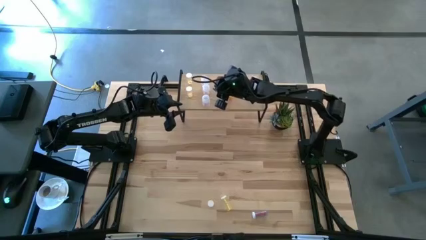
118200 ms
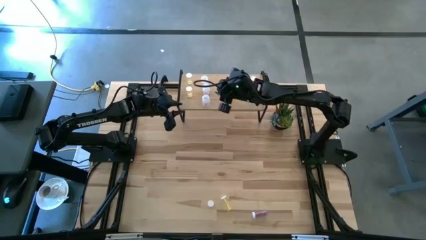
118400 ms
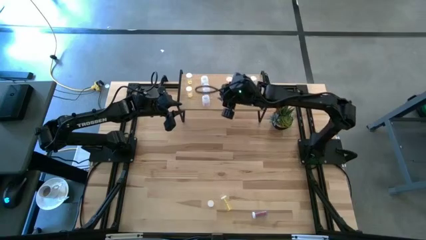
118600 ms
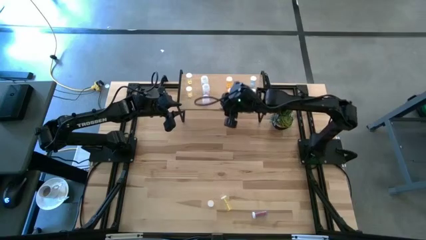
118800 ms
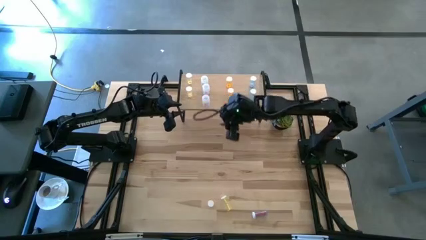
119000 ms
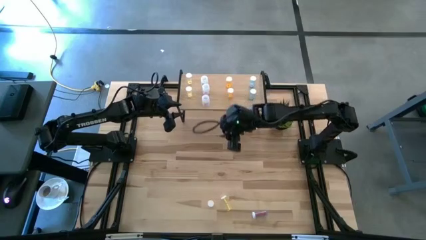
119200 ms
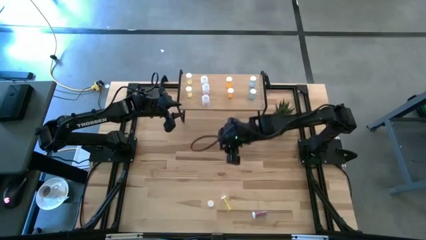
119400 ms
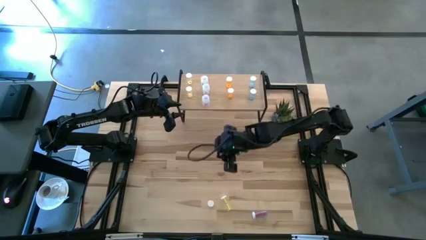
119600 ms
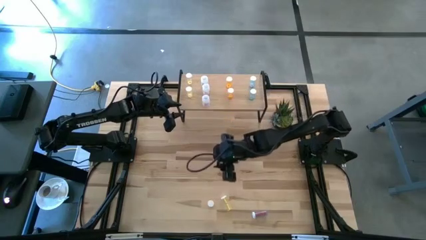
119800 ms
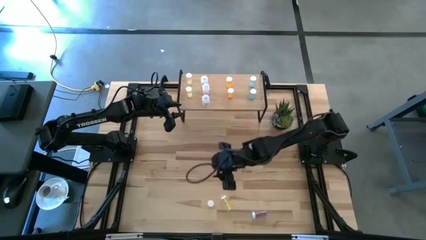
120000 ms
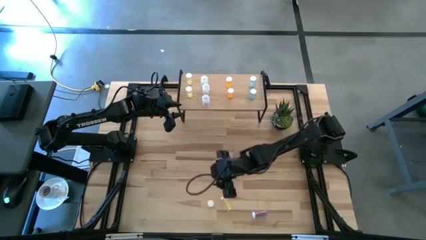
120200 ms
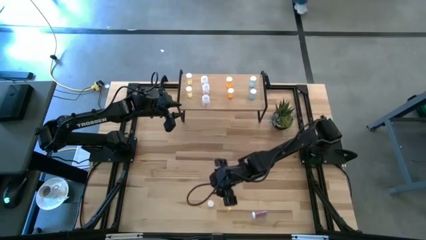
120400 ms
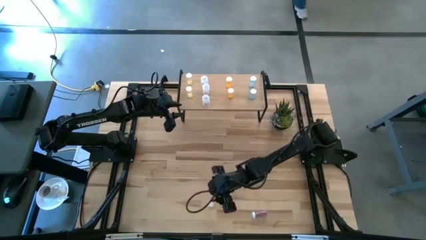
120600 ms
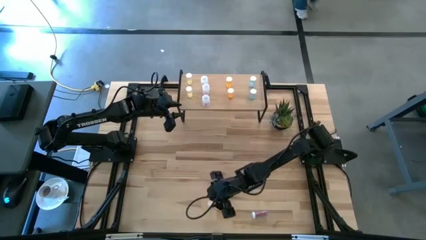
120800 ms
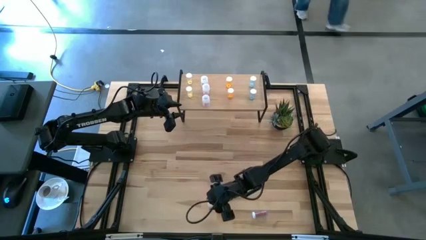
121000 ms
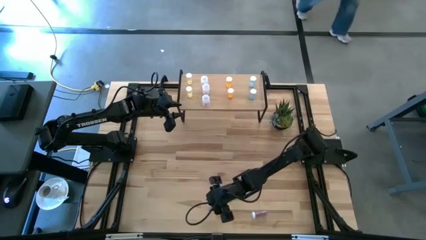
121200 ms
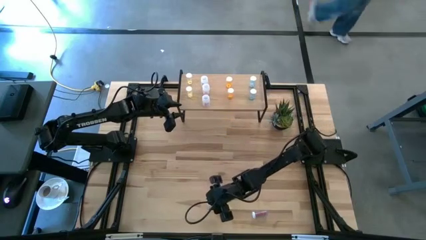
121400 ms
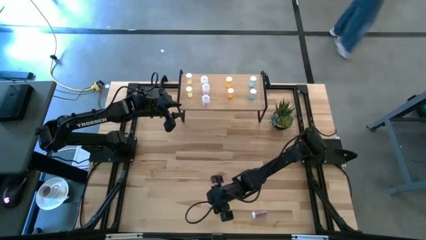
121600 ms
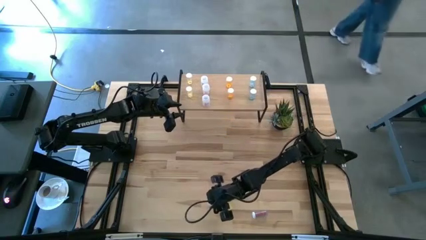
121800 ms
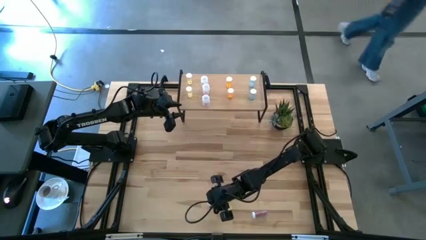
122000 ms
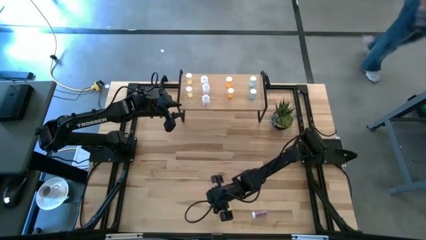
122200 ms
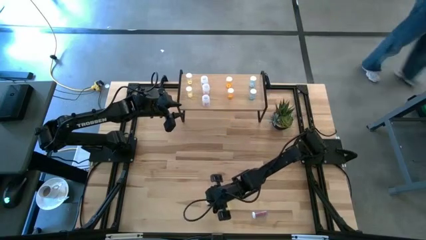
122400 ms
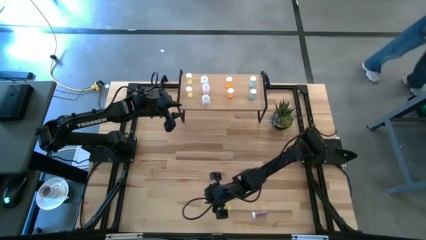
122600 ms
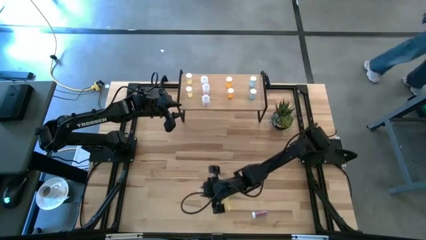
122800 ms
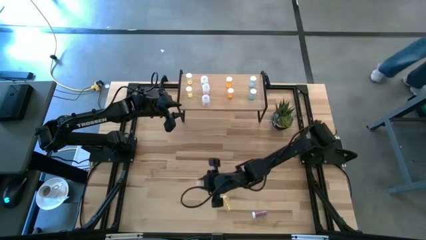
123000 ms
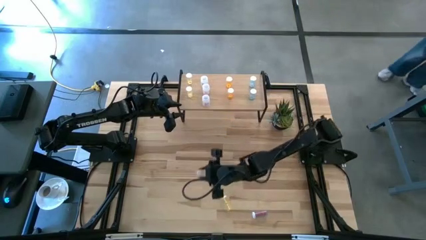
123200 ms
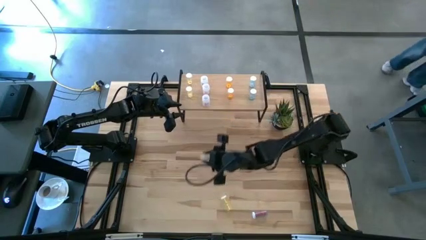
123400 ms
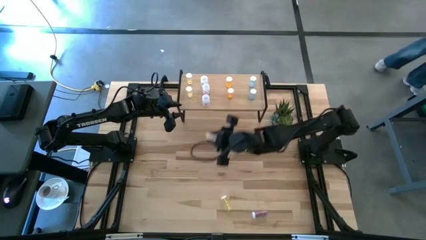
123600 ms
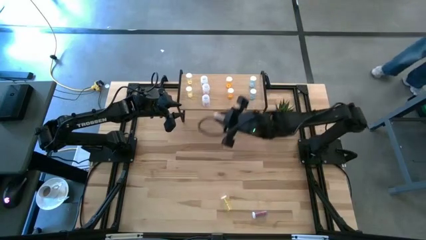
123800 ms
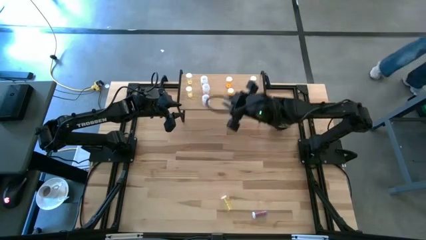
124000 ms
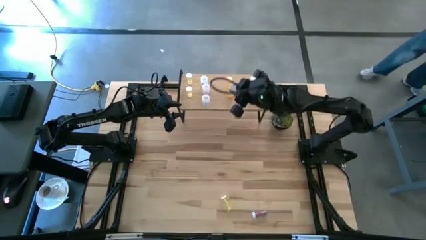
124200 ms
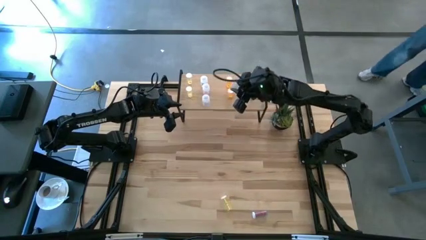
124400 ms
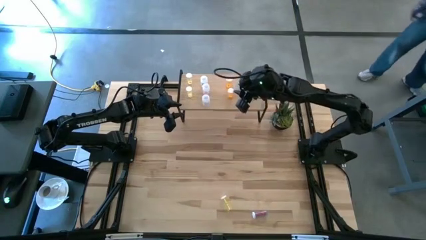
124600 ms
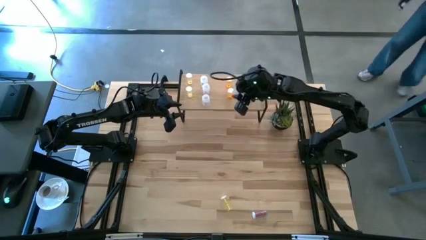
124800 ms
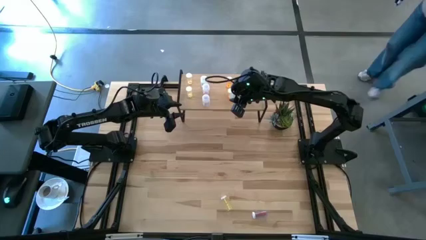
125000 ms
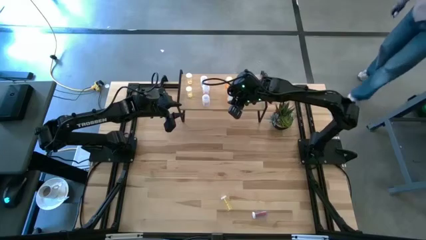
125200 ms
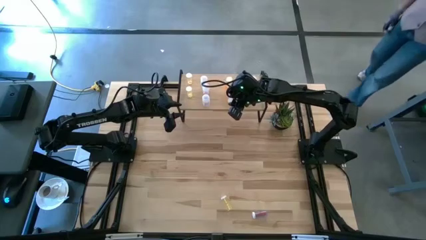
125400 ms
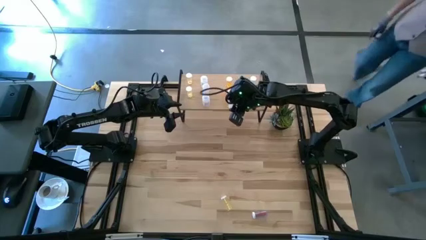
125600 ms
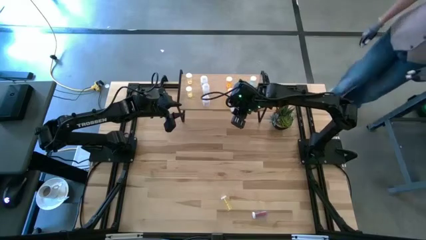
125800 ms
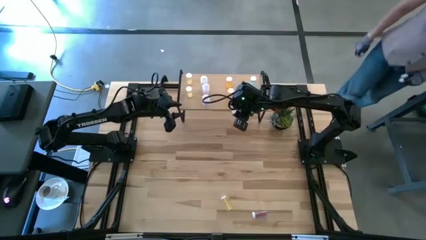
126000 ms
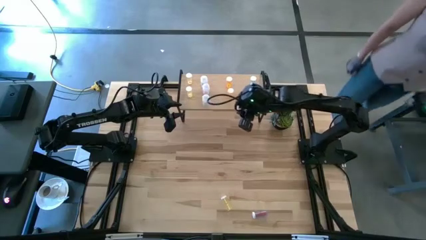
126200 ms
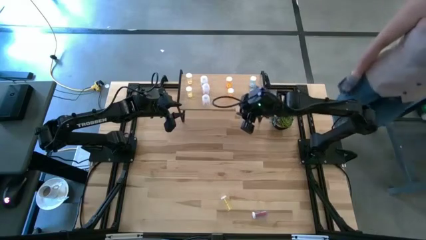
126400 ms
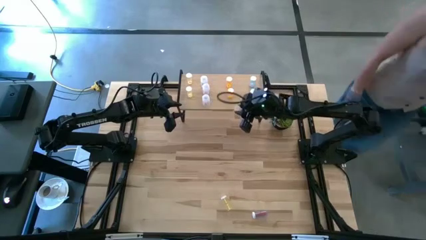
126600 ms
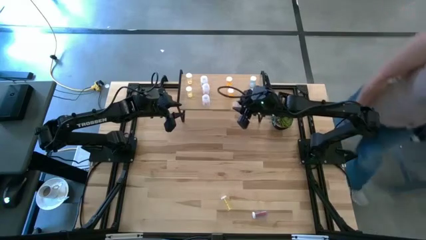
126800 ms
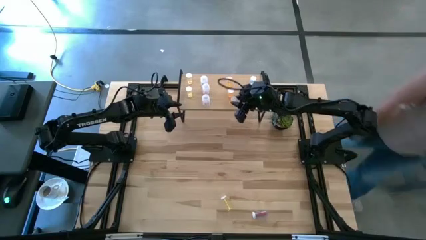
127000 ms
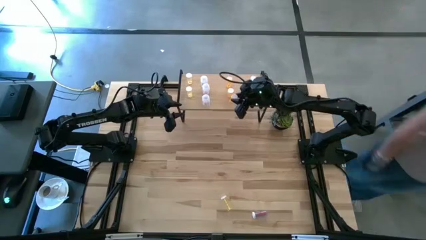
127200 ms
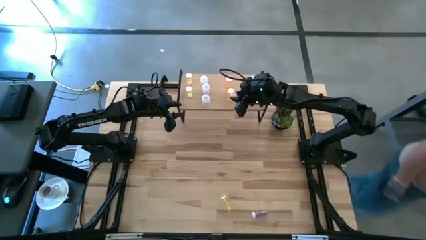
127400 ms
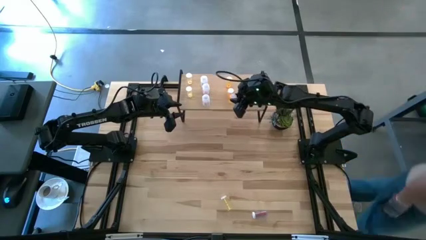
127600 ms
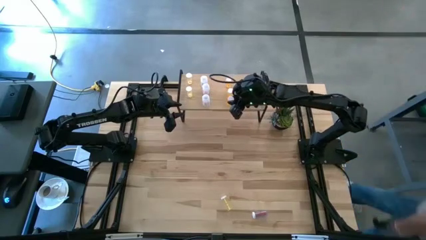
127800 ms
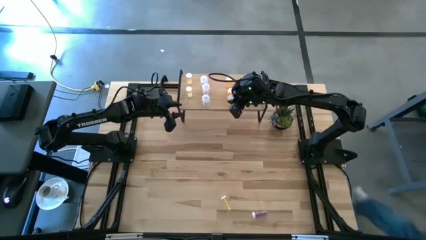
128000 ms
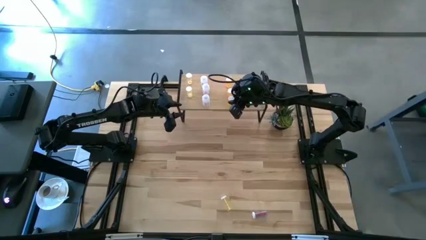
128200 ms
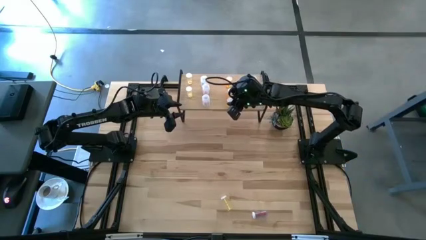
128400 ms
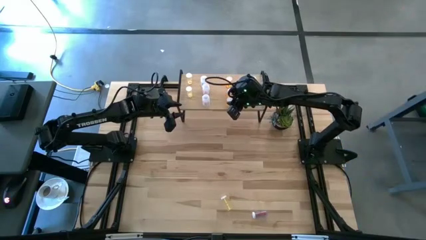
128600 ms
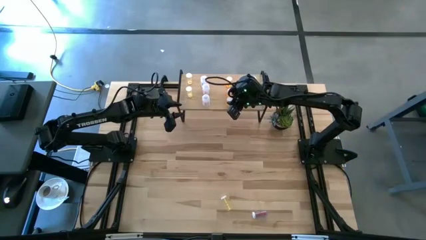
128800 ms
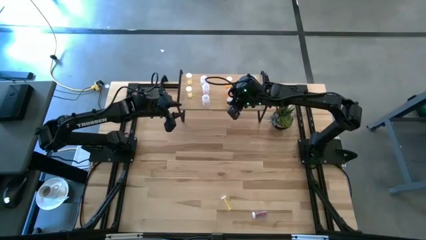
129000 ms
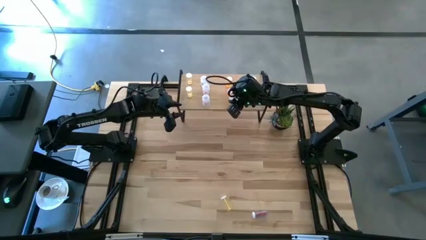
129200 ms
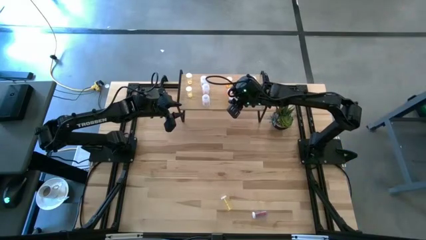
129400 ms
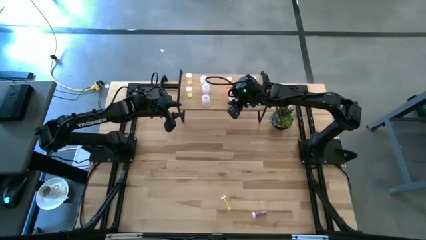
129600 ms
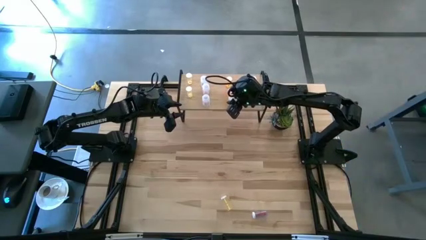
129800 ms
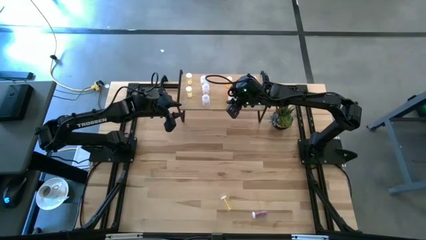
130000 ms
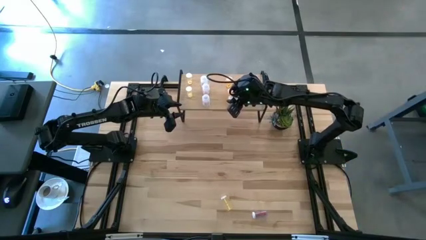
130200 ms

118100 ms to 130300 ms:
Task: Pick and place medicine bottles onto shelf by color
Put the orange pill bottle on the shelf aligned with the other orange pill bottles

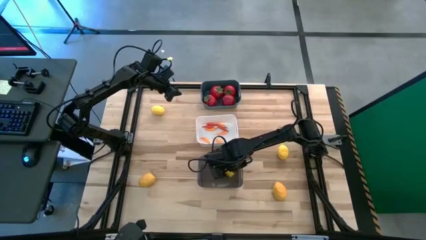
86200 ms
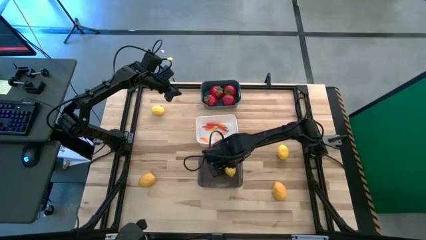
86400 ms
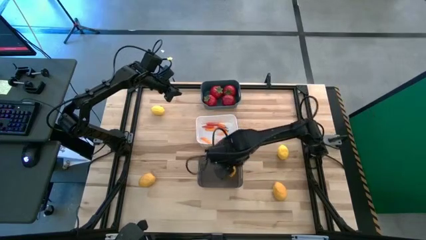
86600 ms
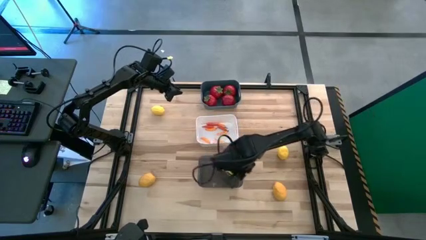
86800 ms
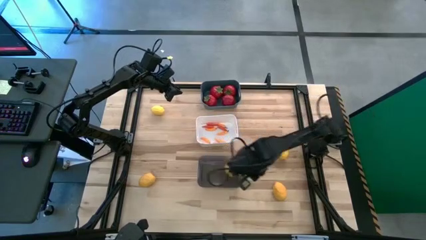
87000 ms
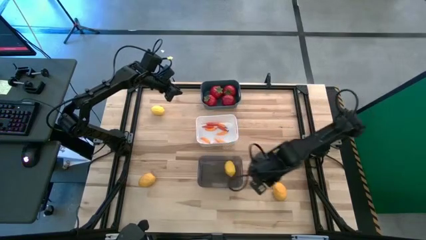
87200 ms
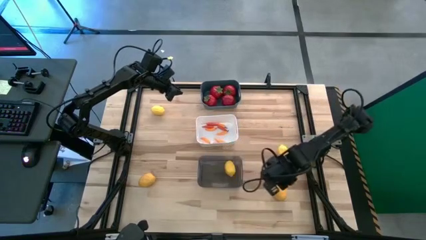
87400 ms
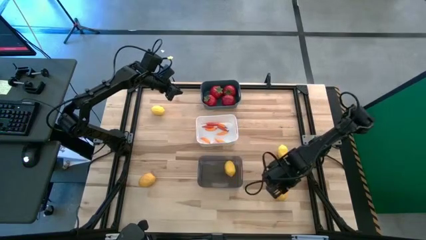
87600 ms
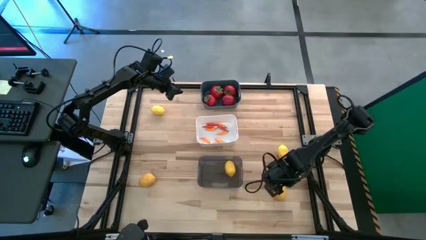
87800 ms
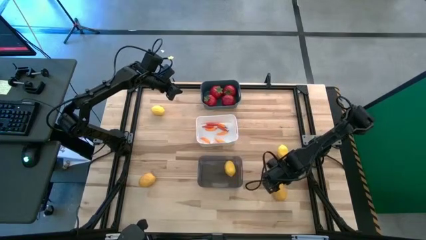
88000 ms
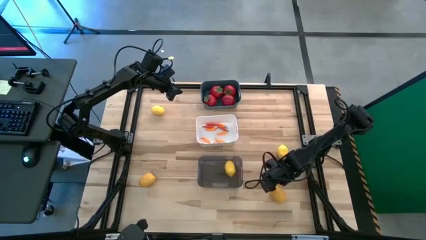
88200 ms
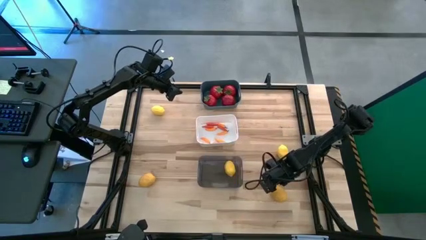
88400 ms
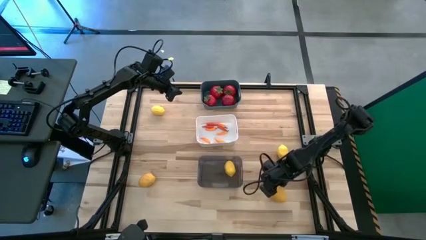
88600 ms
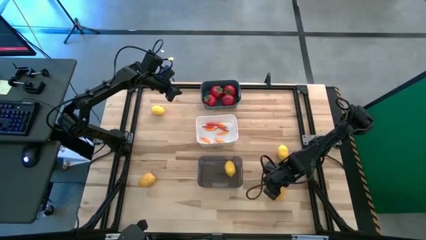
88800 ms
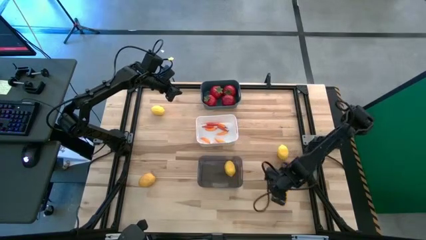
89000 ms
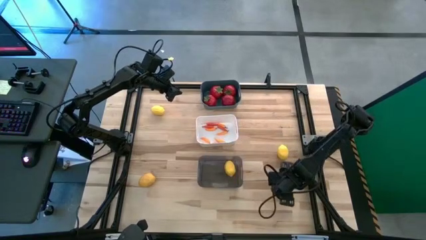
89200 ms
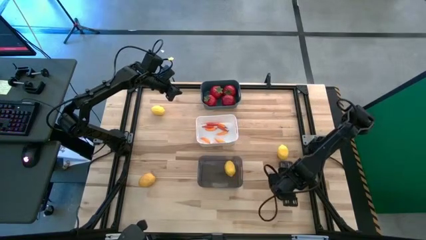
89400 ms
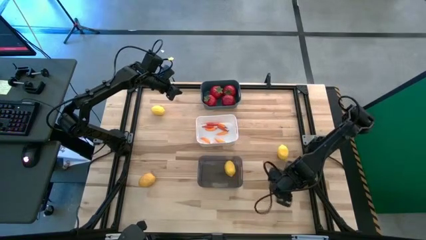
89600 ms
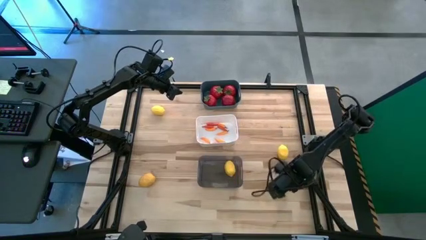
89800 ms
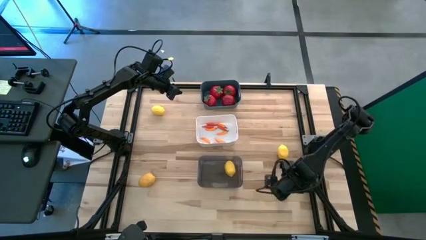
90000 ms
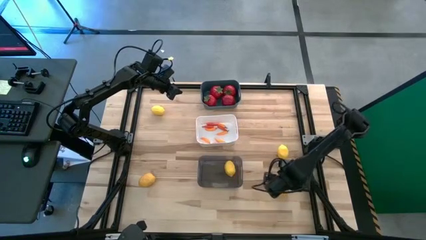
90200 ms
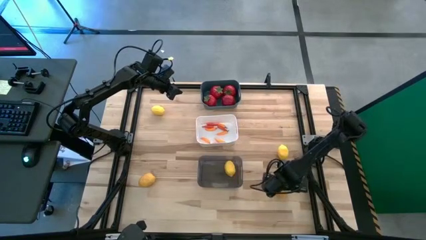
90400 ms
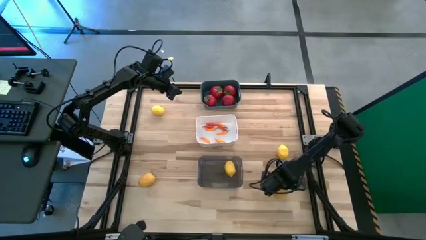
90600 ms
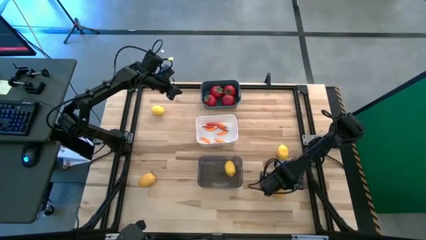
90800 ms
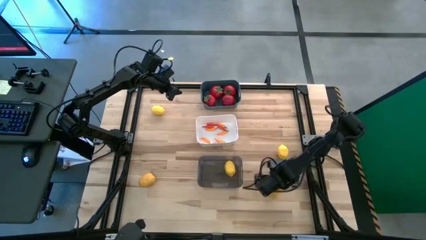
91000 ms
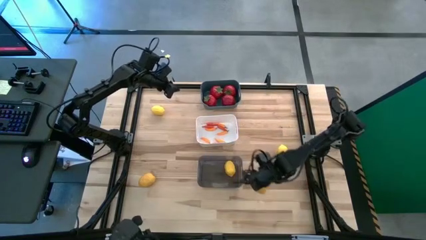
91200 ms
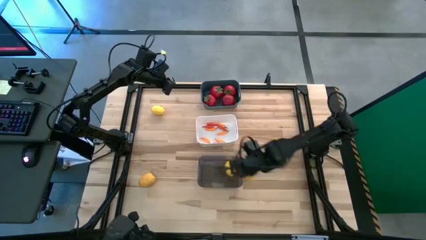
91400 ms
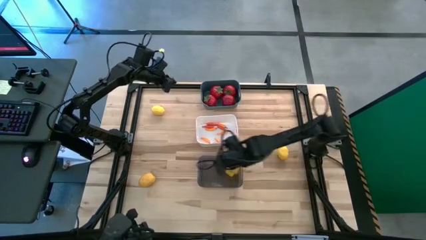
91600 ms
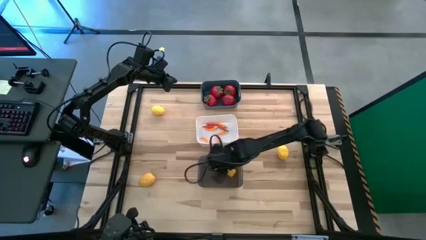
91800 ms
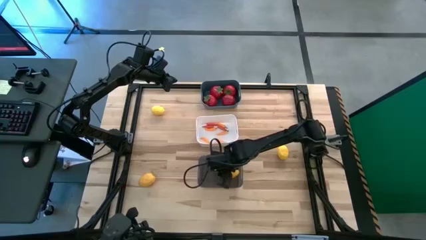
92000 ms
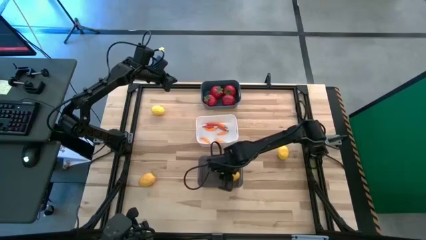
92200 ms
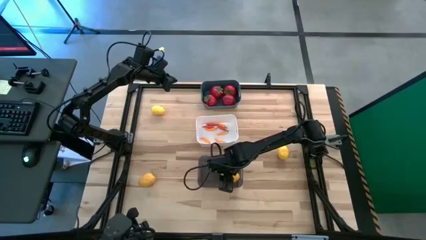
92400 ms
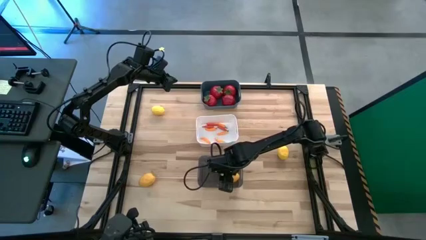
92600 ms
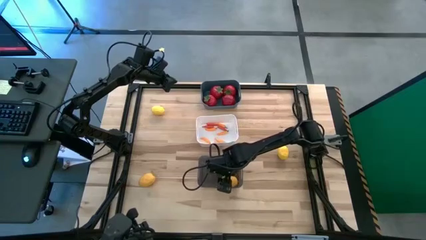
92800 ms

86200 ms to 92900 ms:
Task: Sort produce into baskets
Put the yellow lemon into the black bin
